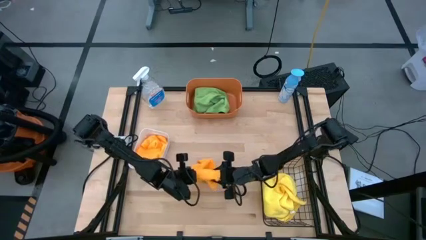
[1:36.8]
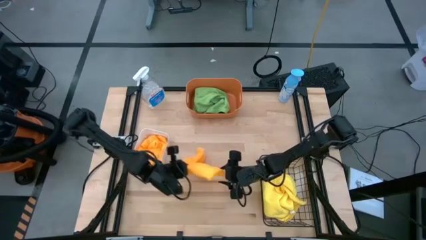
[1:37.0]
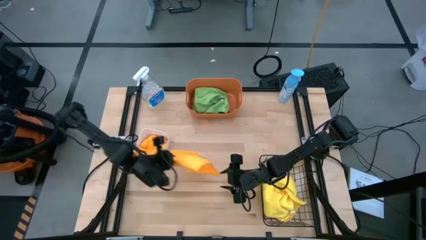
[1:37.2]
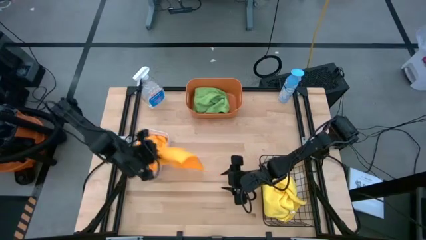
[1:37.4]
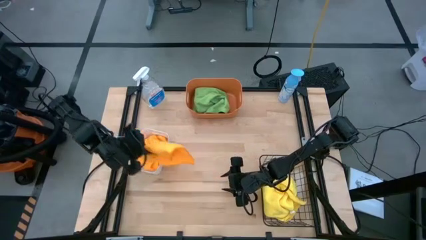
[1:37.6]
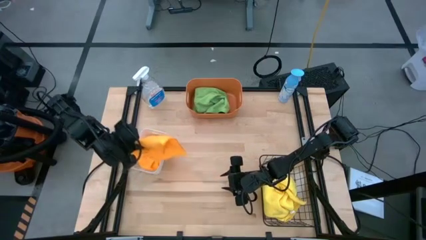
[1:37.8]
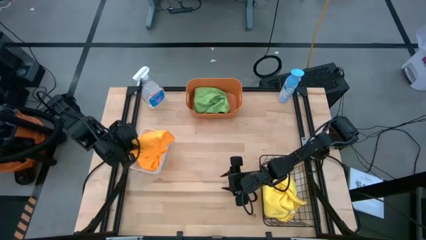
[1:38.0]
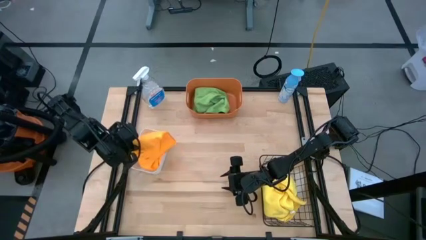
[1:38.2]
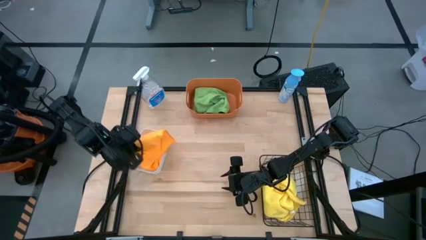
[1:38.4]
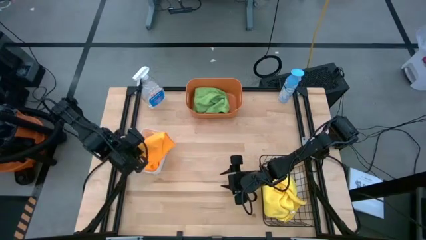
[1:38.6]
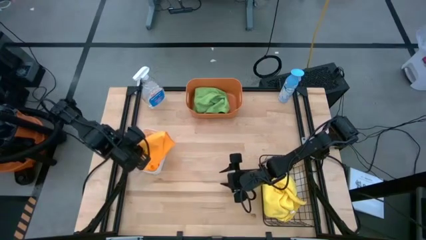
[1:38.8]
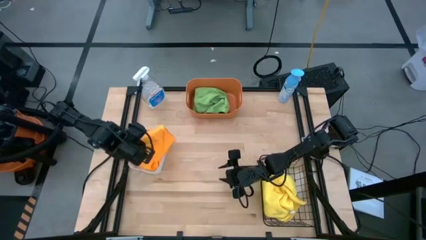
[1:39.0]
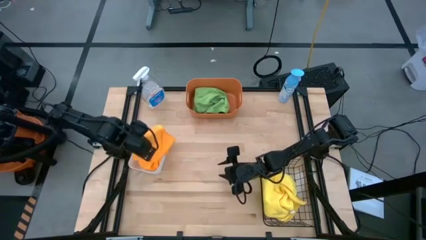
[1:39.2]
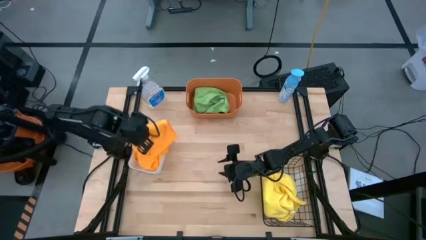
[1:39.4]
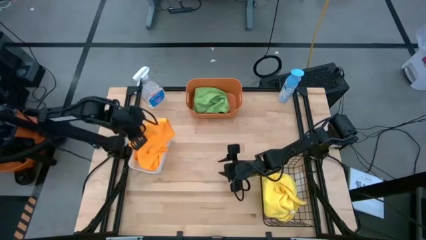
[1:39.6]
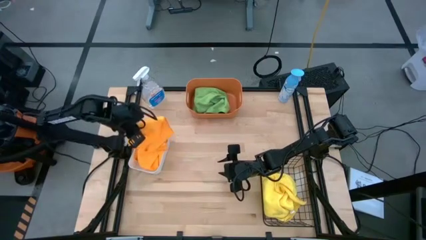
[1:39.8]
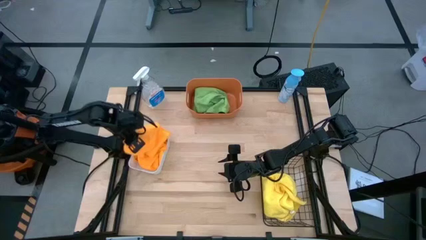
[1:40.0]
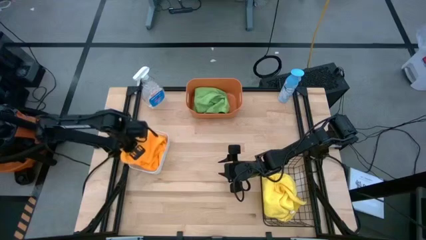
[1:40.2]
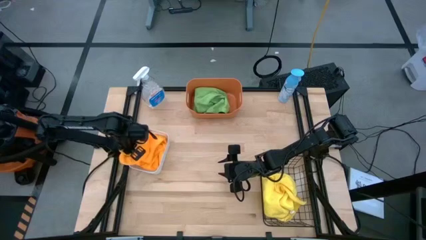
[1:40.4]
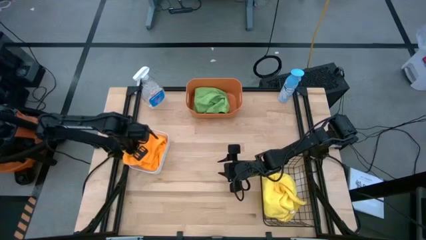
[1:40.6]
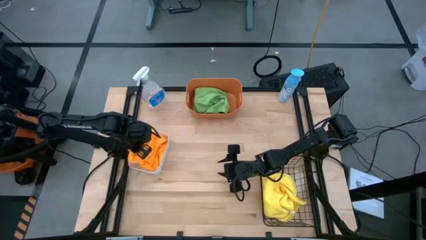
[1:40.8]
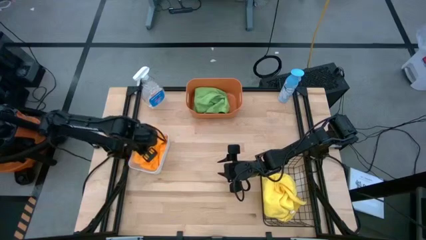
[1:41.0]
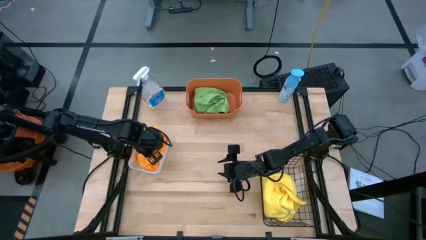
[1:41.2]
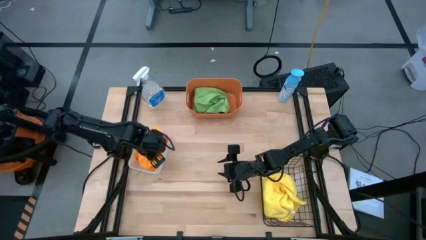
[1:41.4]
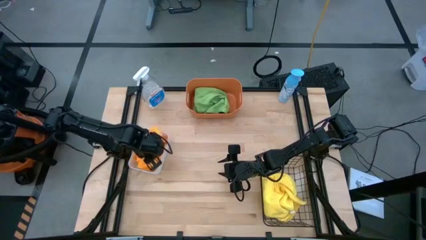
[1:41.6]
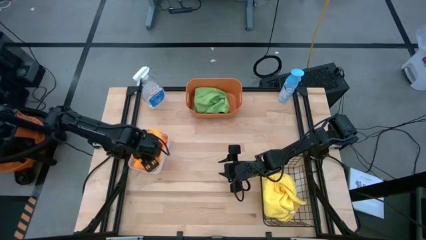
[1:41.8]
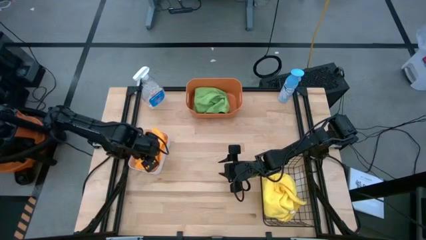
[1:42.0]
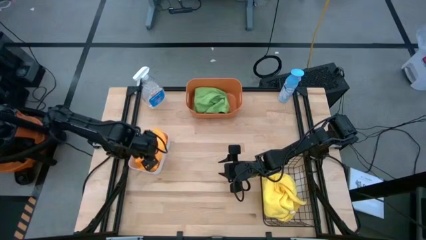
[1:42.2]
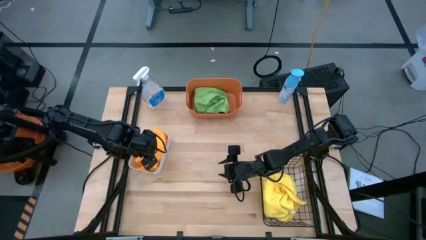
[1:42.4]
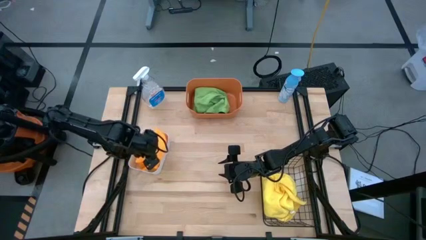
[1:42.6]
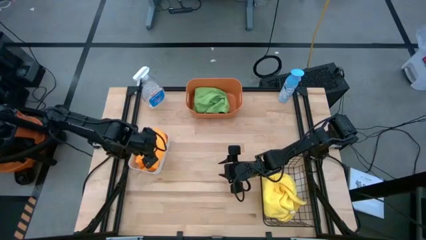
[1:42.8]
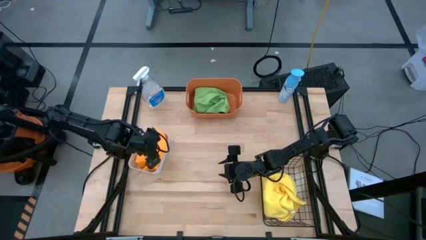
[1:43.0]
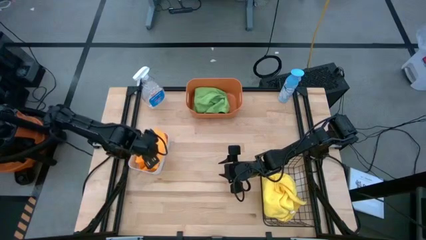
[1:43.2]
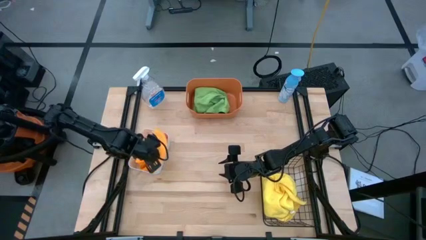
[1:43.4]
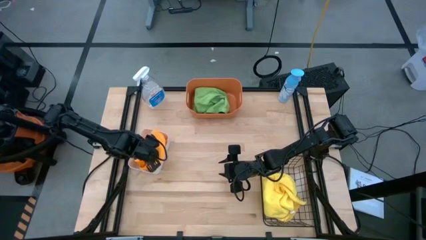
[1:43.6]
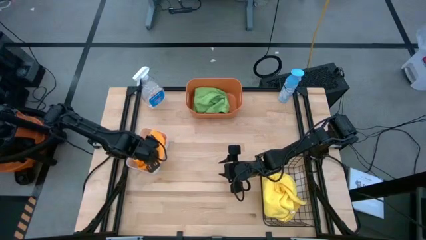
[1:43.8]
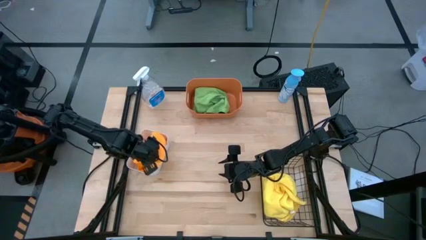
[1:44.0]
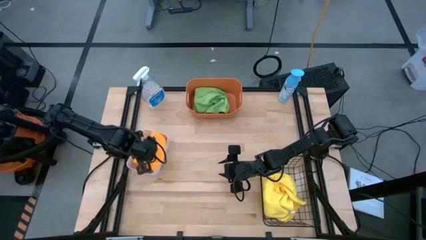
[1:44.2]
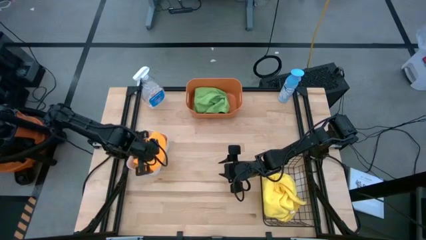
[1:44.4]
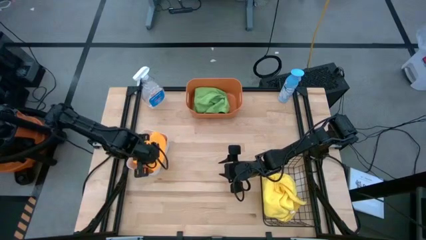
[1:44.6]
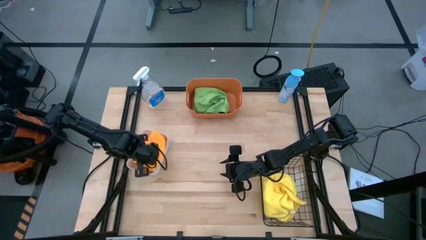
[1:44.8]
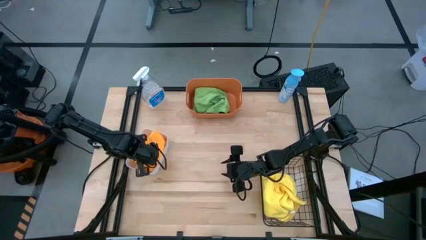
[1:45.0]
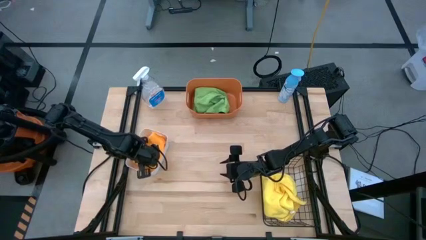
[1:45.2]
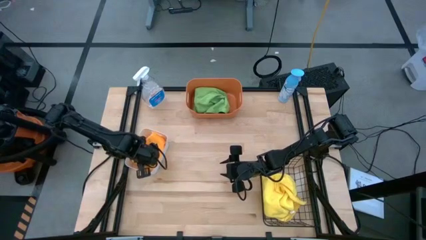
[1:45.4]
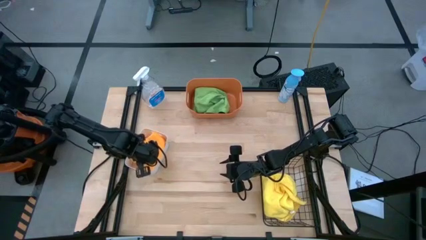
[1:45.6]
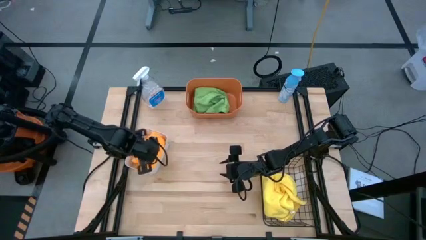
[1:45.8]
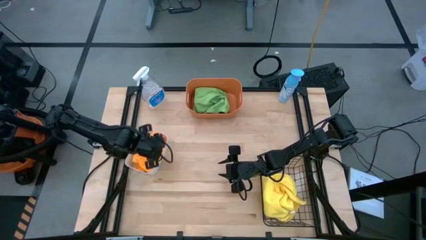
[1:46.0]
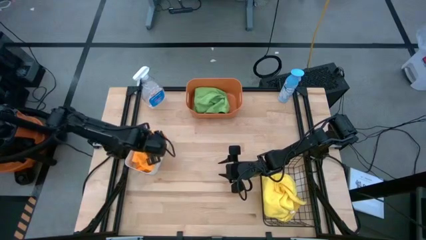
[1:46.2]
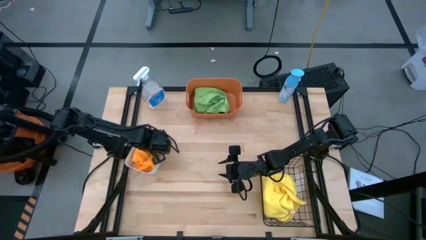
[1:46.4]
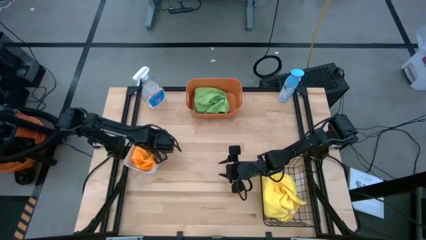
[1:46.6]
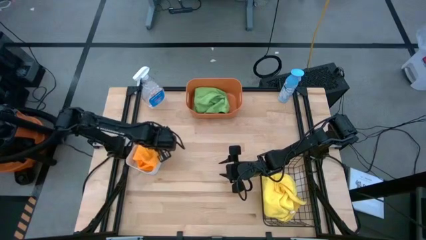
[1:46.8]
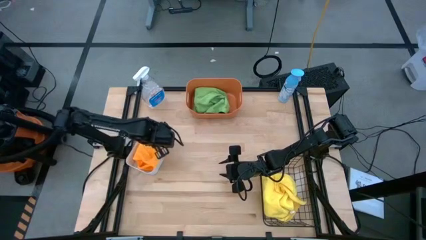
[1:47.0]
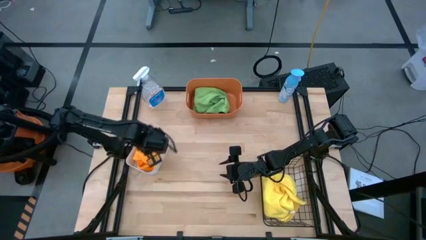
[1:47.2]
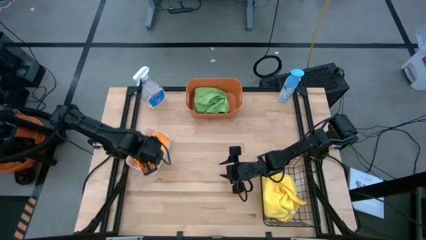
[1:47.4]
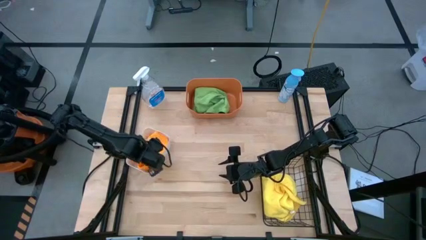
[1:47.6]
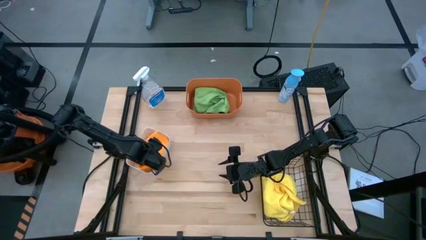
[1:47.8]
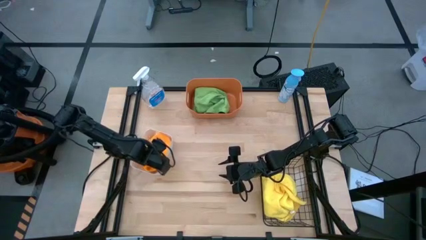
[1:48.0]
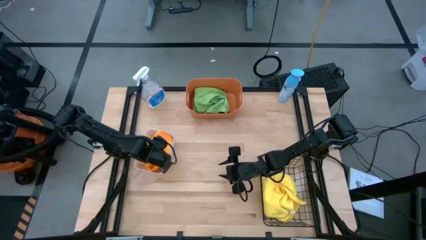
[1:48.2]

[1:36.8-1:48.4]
Task: Sort microfiber towel by color & place in baskets
Put the orange microfiber cloth into the white bin

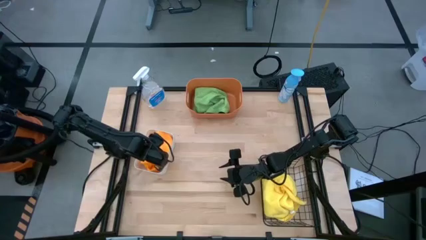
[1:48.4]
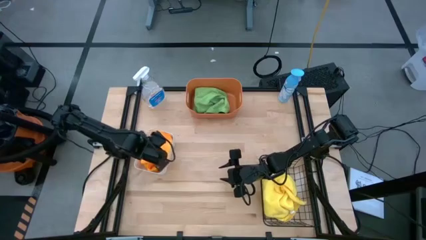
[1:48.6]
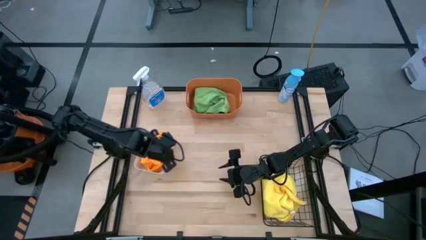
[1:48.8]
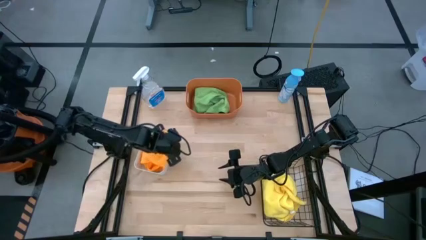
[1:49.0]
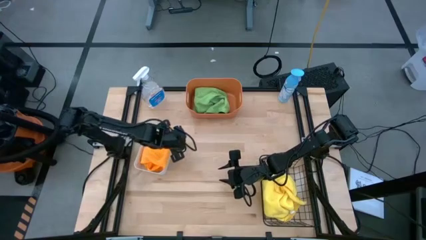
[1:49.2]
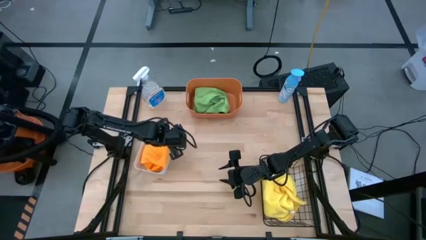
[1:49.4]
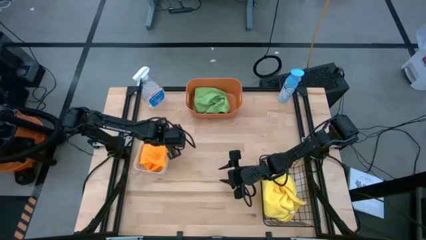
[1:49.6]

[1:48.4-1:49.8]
Adjust the white bin

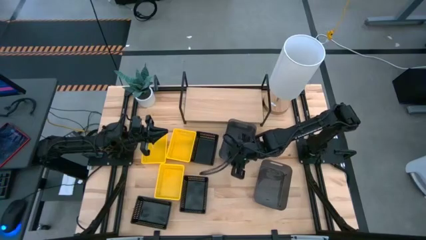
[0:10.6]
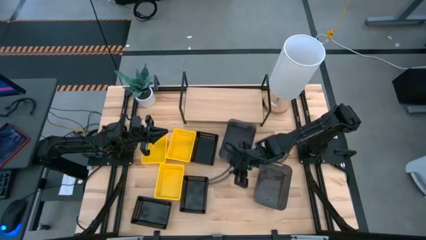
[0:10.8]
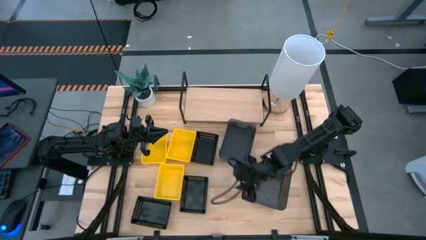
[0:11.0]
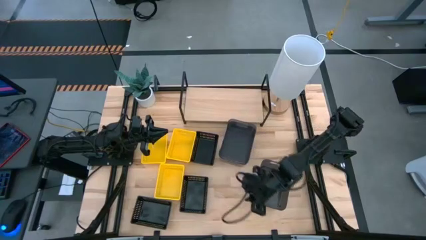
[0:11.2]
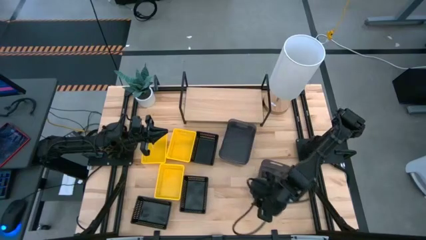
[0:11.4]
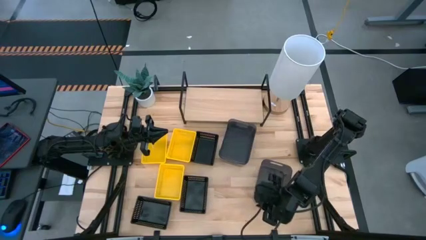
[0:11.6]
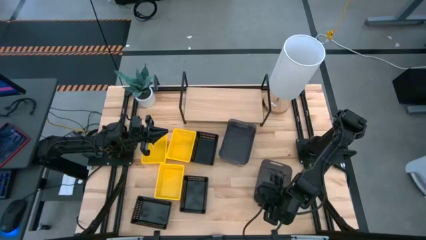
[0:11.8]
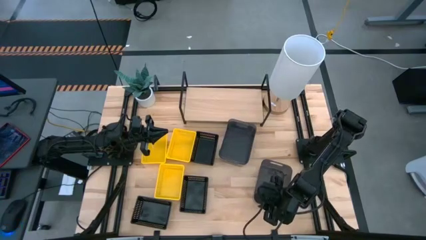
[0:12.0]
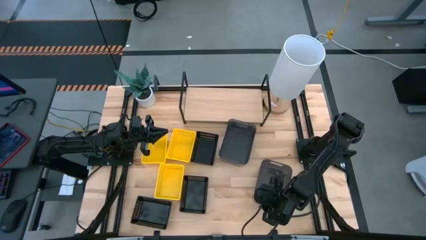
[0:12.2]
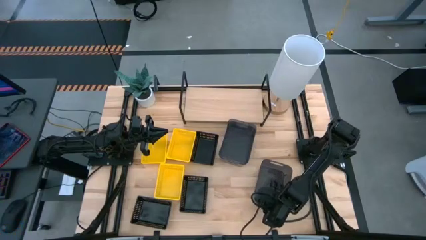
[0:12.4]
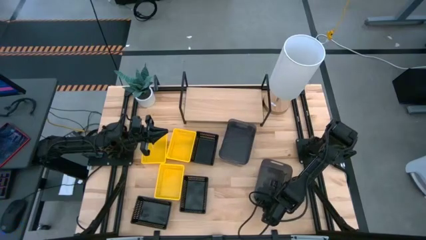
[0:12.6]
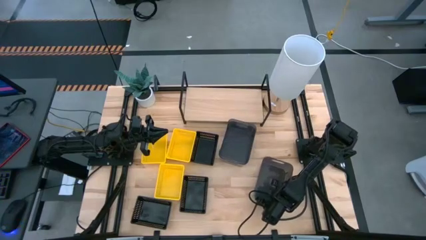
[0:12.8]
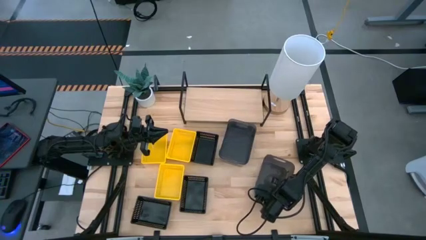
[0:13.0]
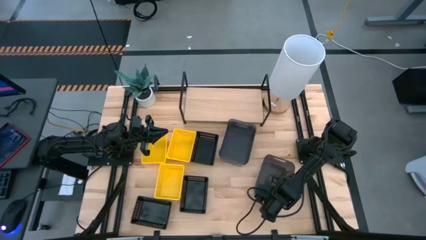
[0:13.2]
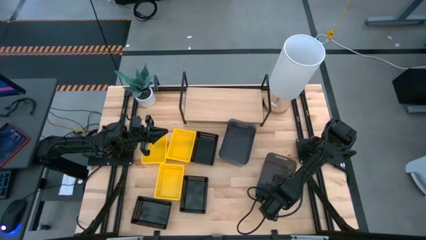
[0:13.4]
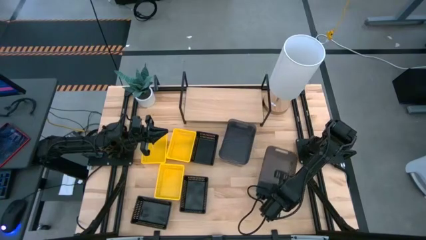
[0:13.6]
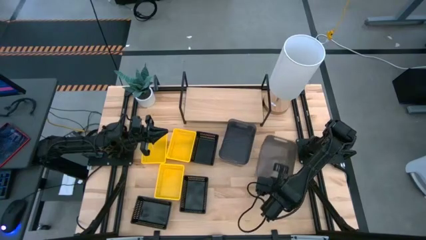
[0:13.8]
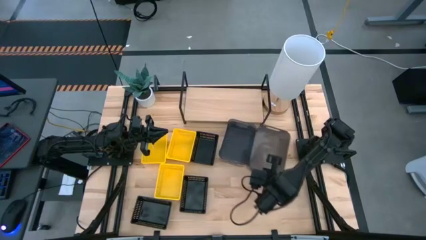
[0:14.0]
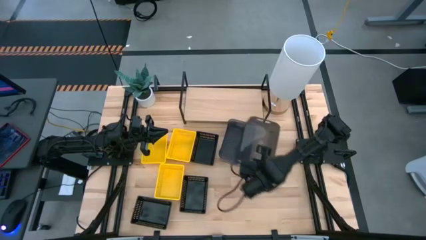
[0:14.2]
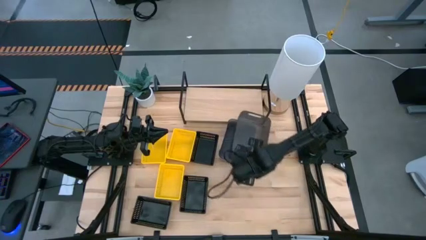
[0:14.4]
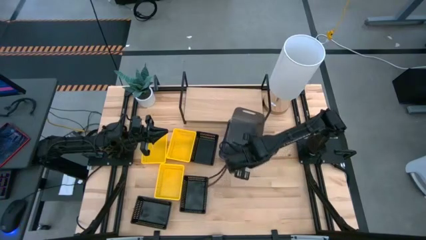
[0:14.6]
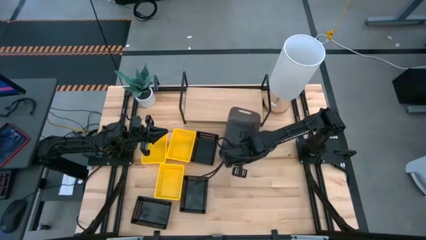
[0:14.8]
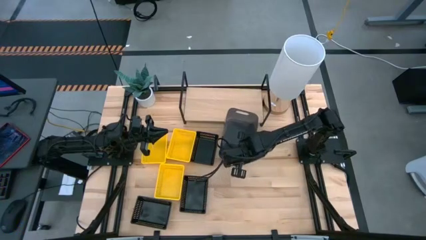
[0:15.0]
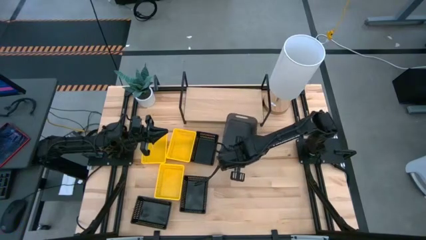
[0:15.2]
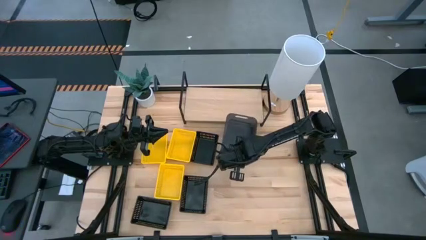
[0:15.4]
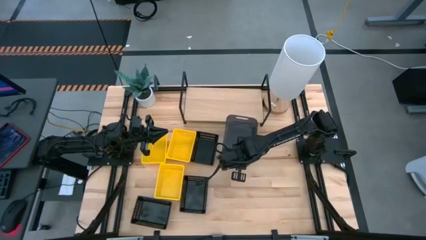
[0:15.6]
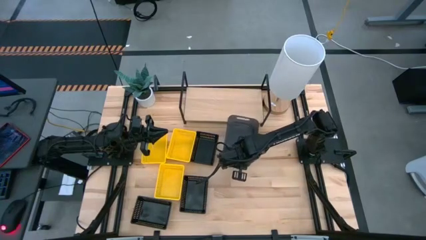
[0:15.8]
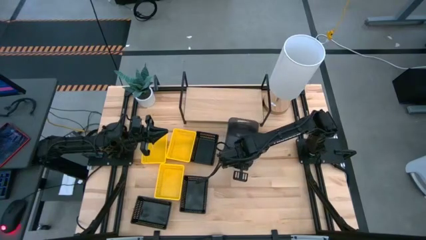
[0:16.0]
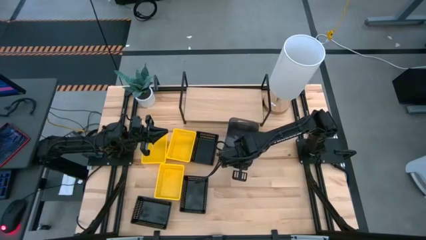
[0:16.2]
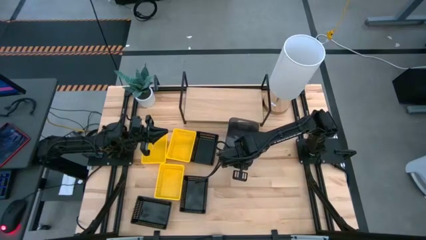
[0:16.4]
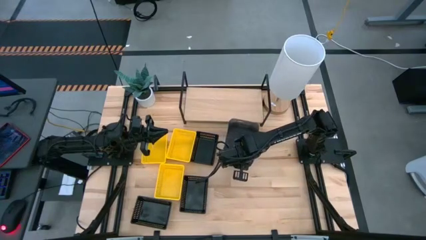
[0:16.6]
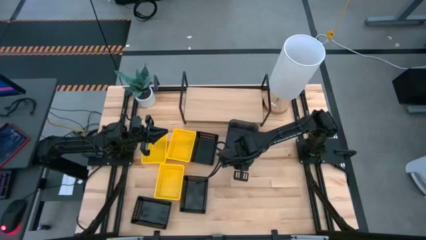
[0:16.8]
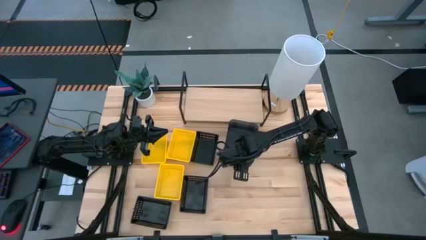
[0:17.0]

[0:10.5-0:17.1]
Task: Stack baskets on shelf by color
Stack the right transparent black bin on the transparent black bin
